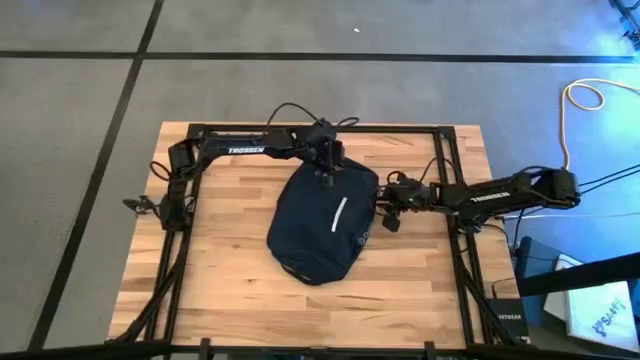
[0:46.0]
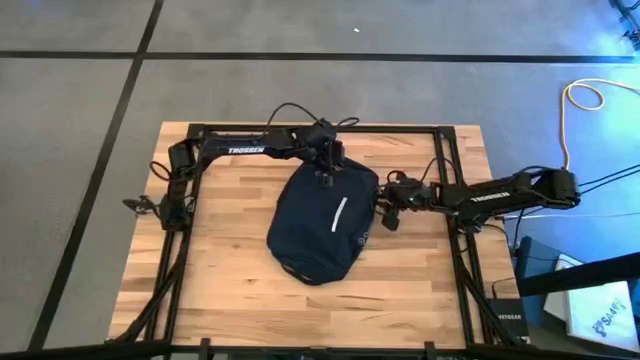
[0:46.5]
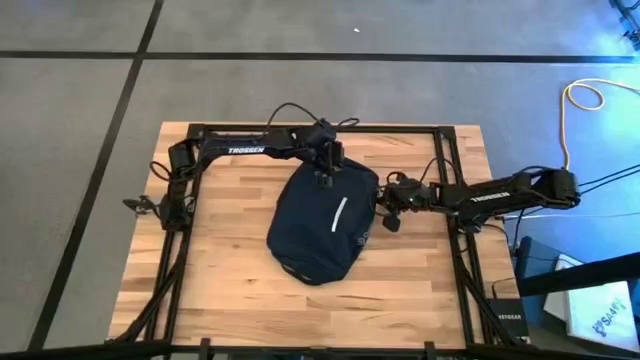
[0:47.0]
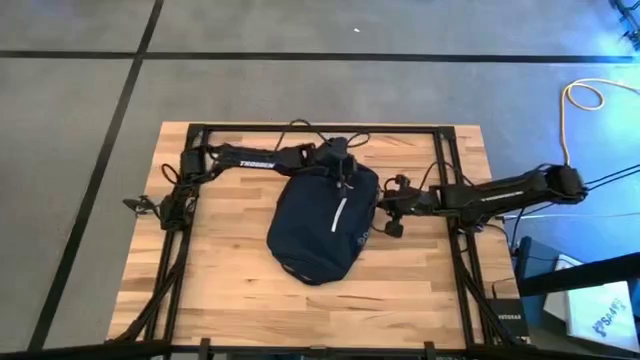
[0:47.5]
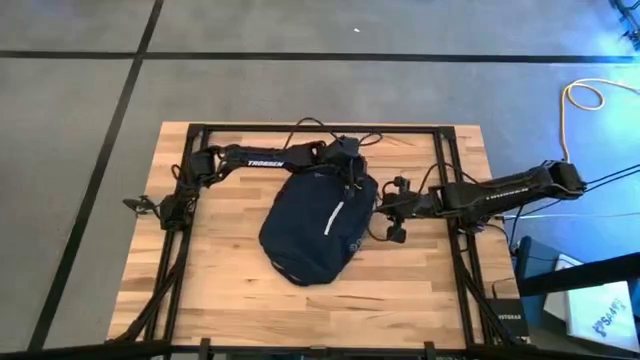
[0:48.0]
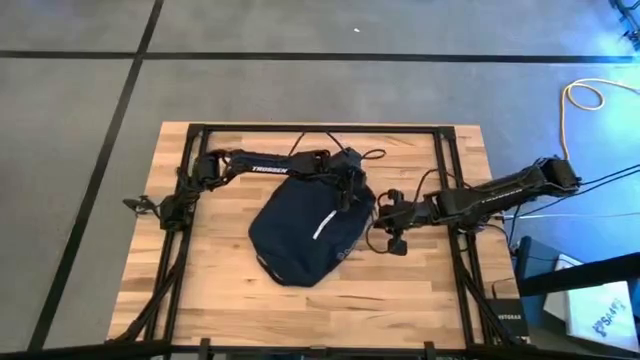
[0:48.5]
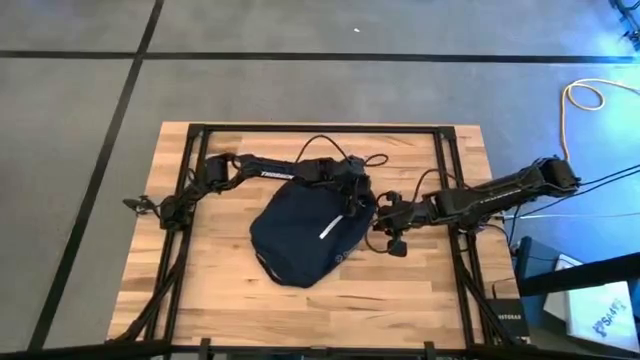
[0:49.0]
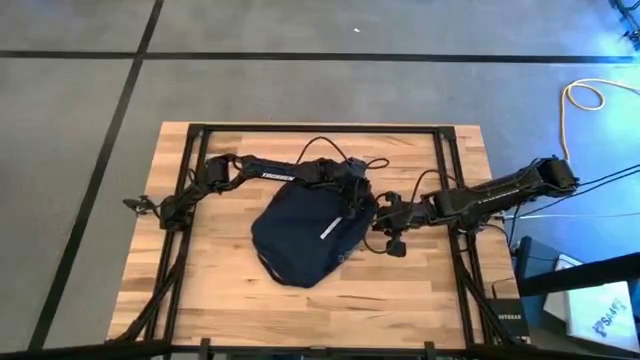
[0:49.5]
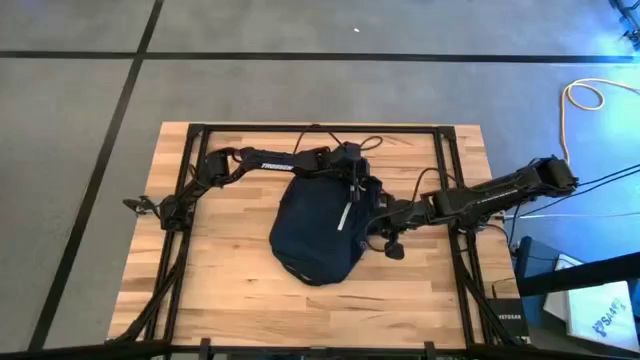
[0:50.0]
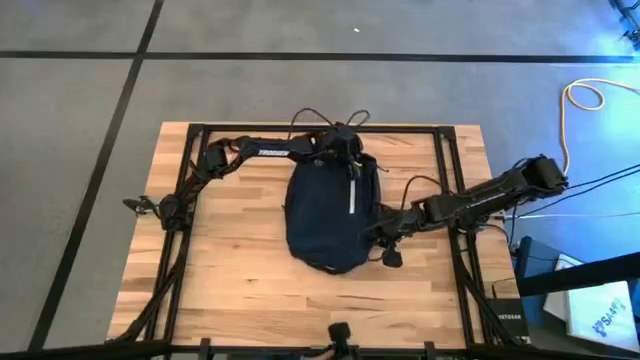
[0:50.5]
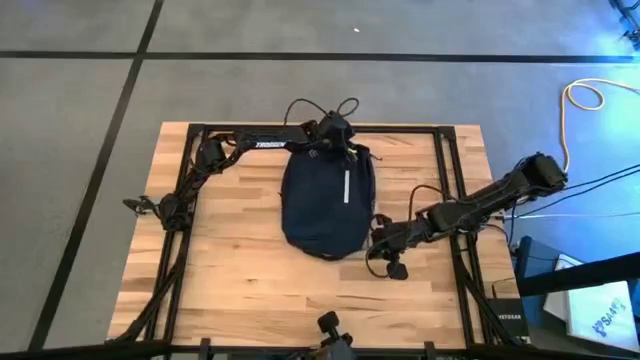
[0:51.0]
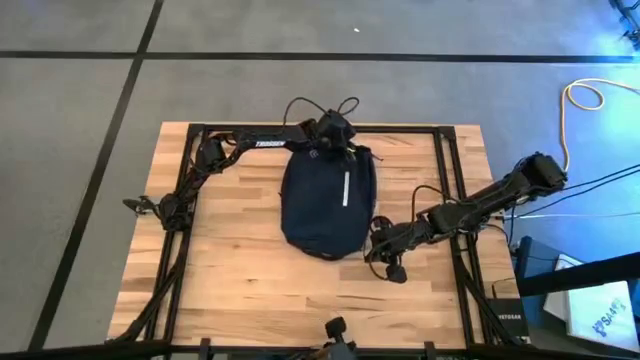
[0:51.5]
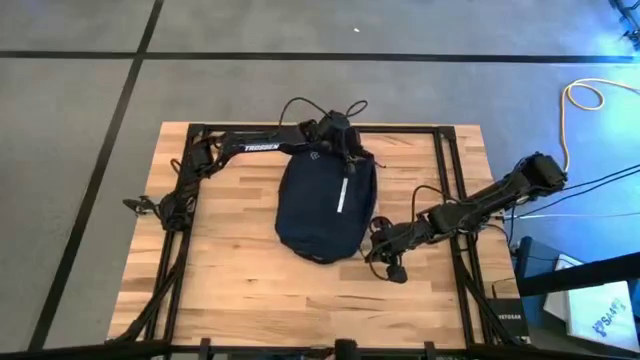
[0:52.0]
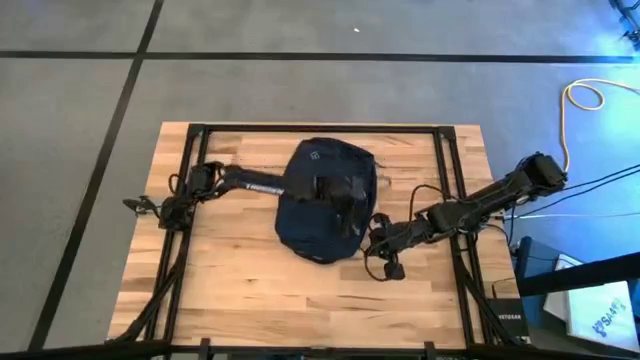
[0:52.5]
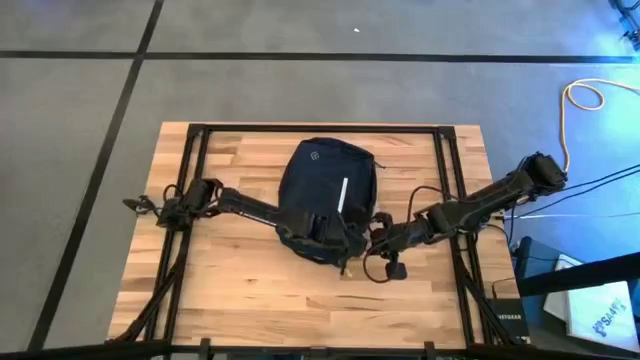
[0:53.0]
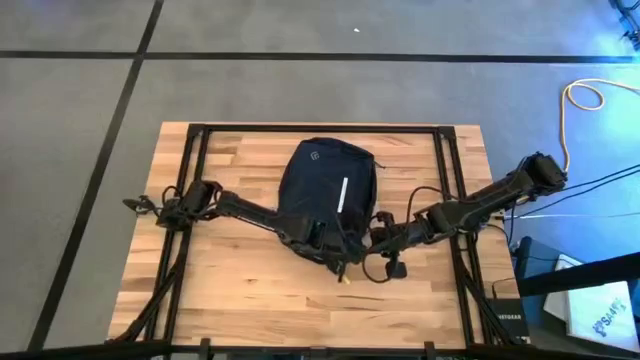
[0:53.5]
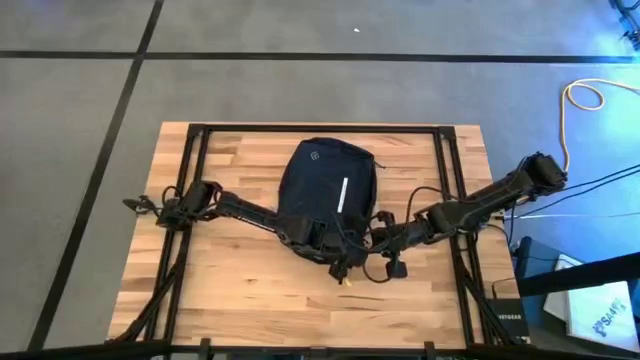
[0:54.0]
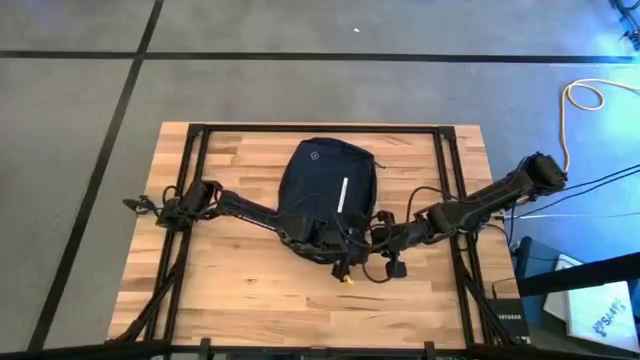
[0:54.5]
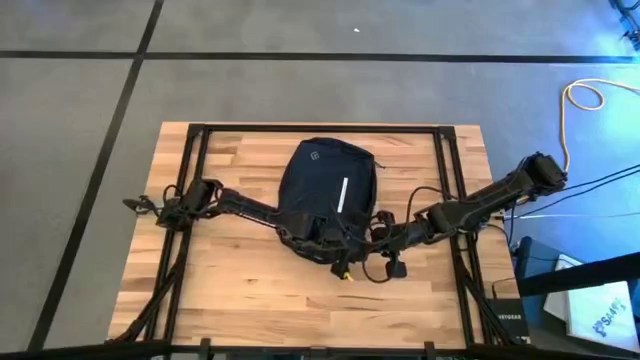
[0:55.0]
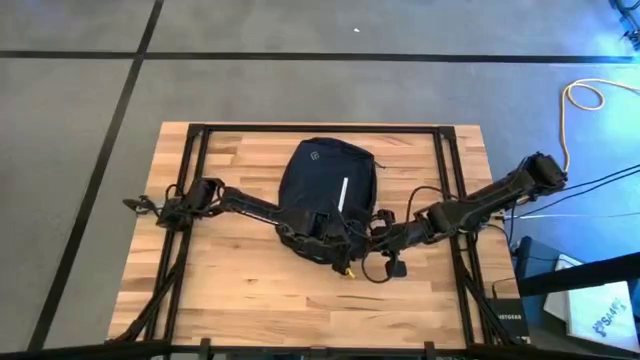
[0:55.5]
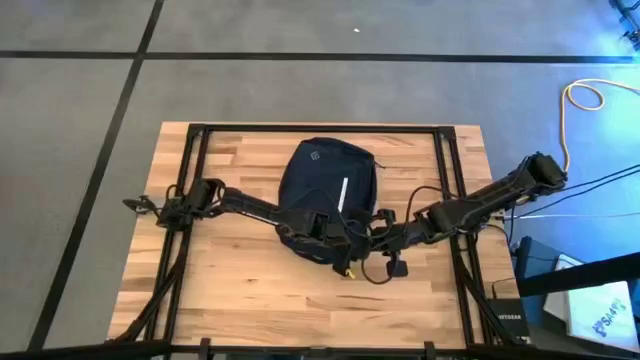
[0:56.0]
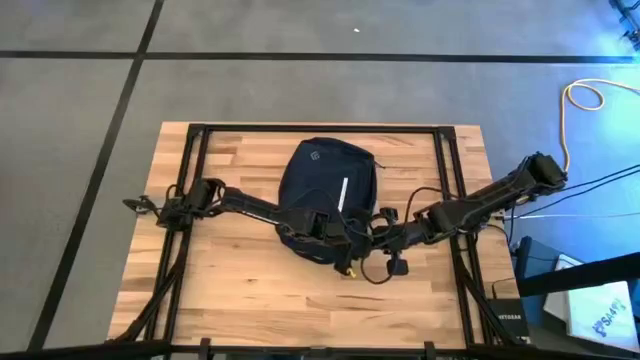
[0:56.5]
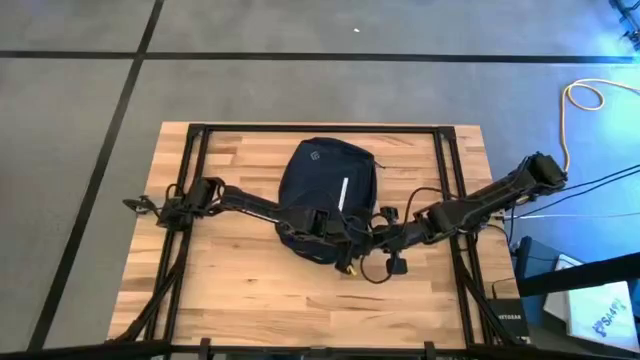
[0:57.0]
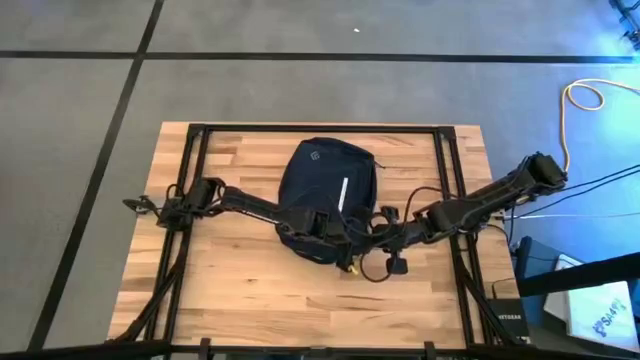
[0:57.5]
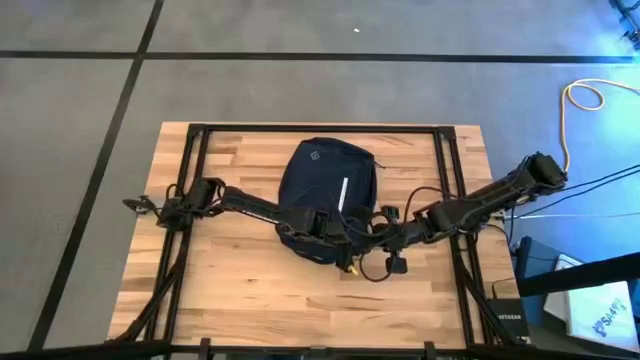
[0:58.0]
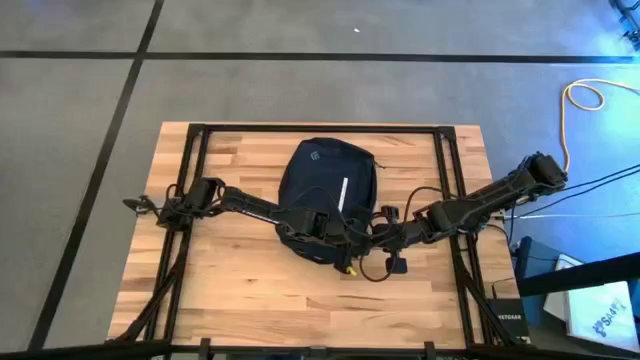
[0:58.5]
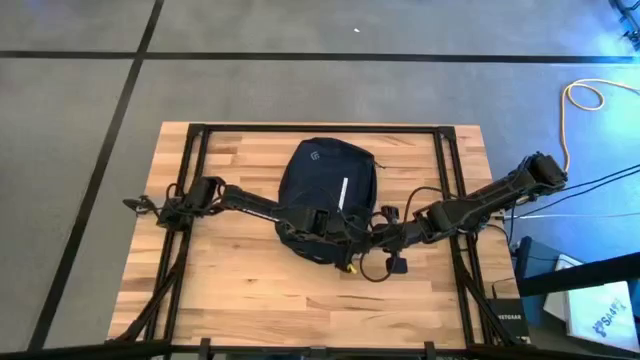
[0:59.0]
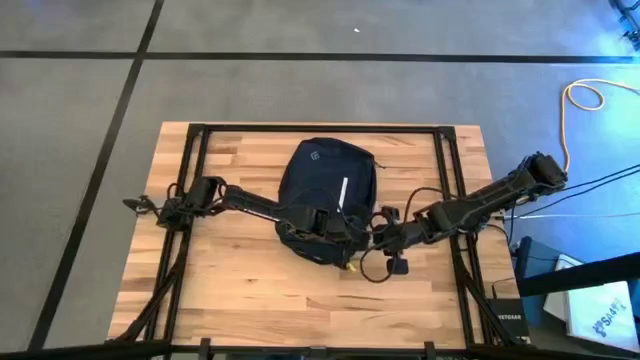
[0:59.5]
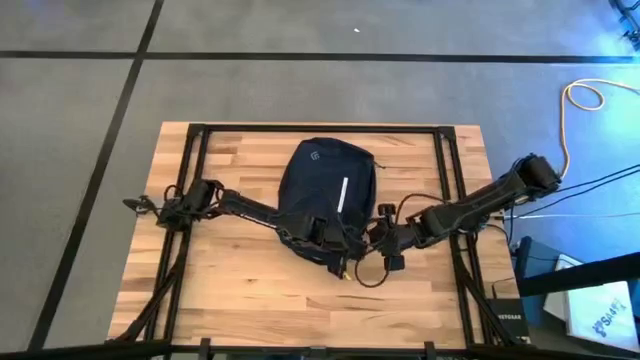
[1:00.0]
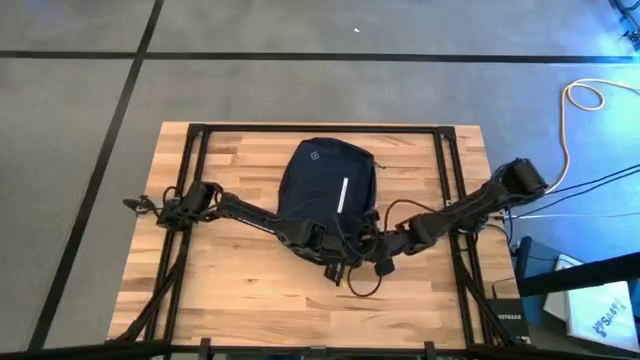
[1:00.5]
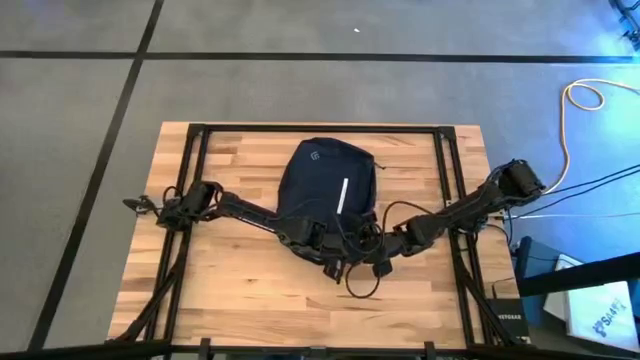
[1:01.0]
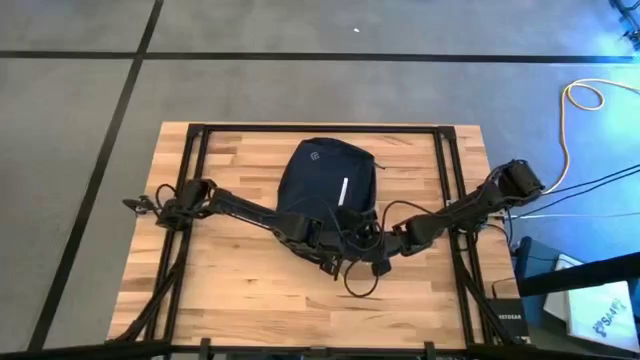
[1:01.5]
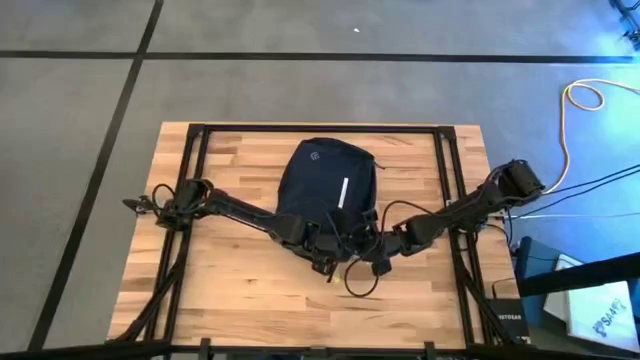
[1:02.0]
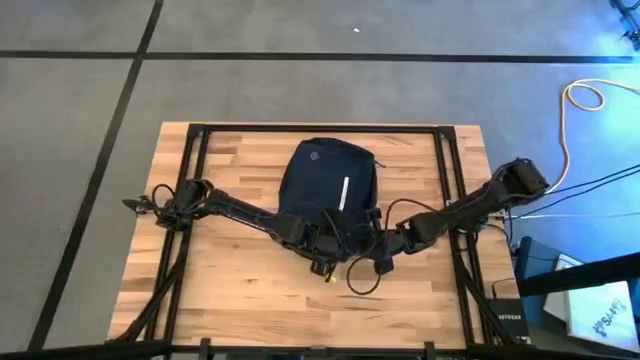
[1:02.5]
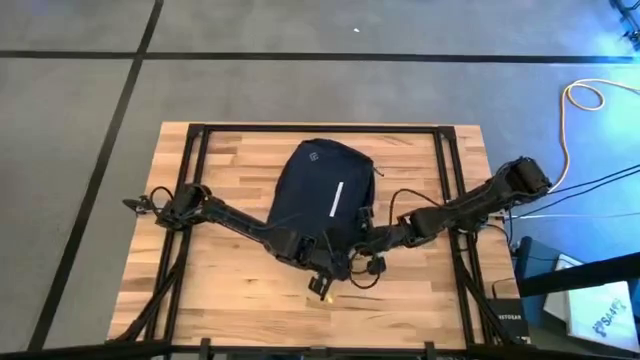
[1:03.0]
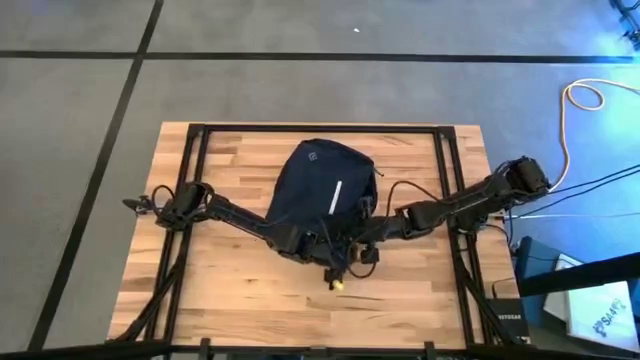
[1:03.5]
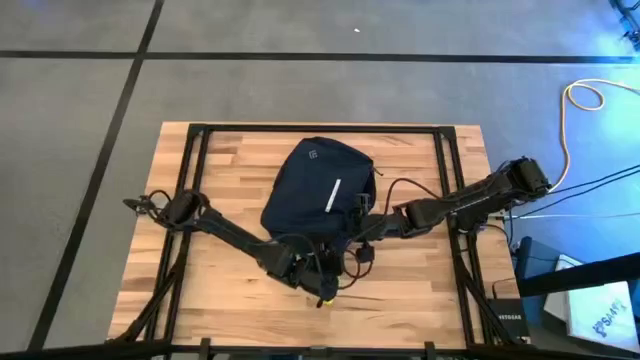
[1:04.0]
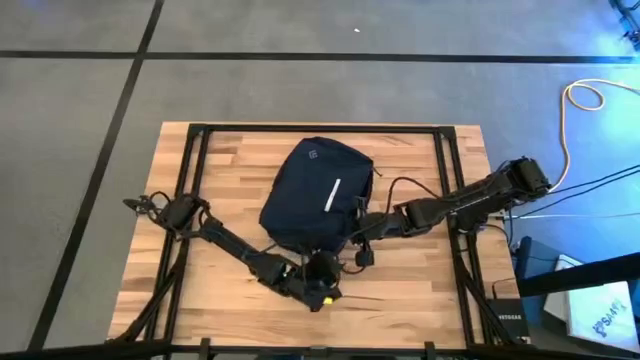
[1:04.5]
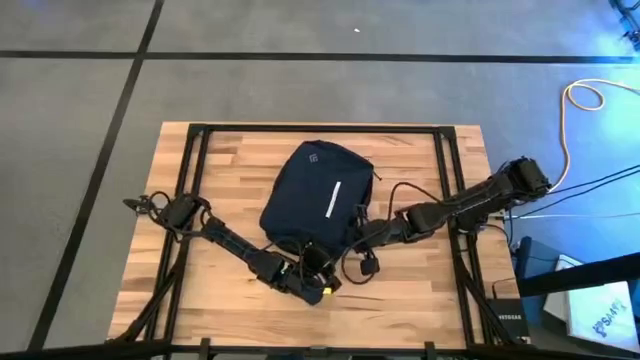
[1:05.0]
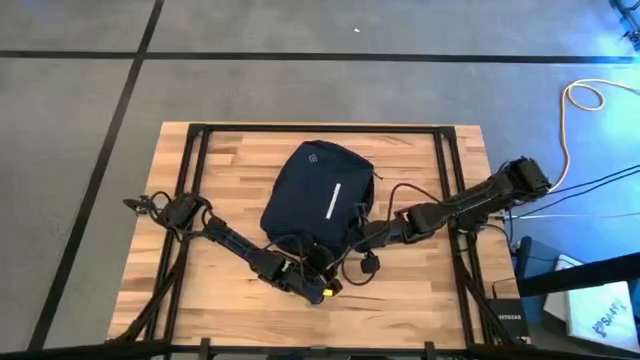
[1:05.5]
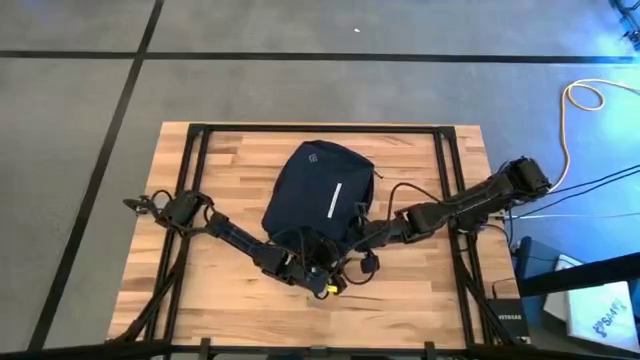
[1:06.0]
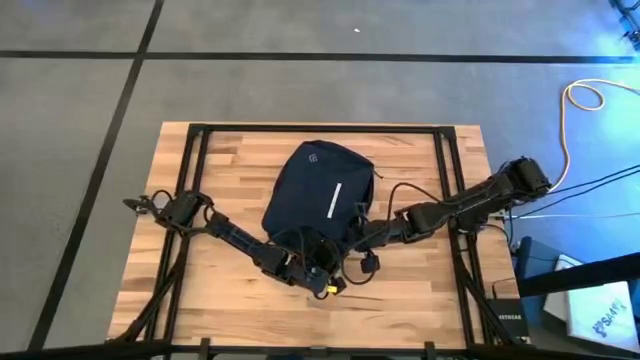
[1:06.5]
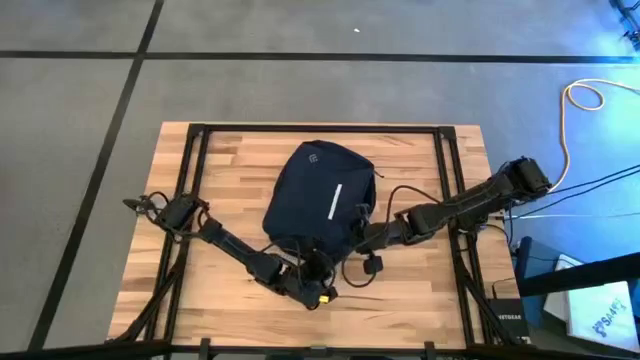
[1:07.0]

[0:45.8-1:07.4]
Task: Unpack backpack
Open the blue backpack
